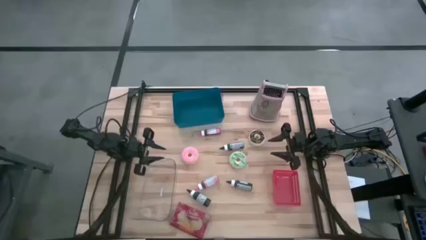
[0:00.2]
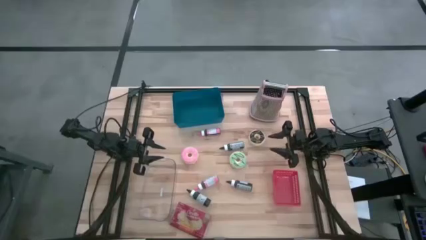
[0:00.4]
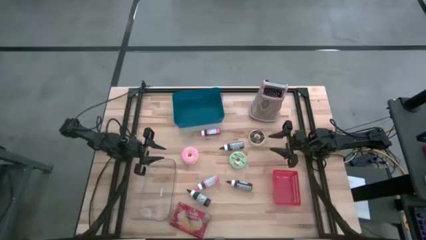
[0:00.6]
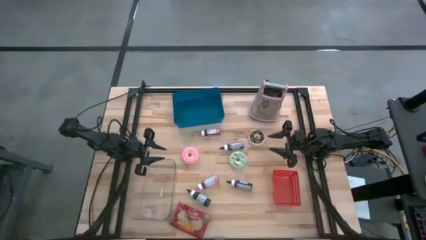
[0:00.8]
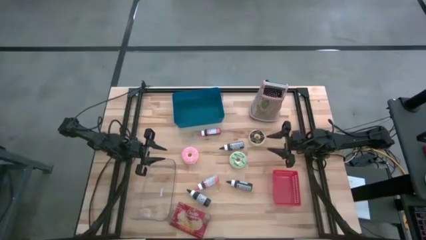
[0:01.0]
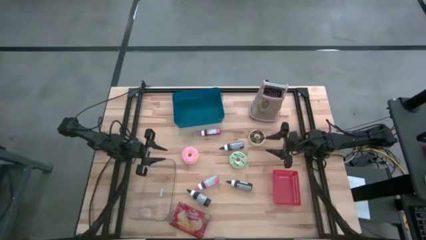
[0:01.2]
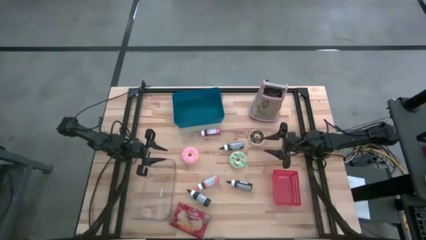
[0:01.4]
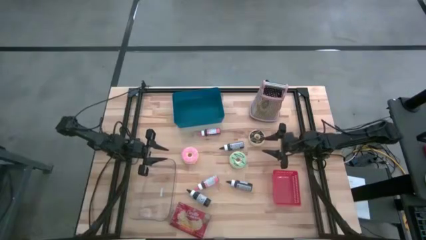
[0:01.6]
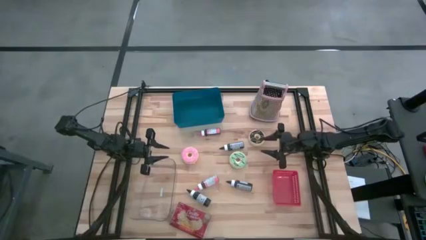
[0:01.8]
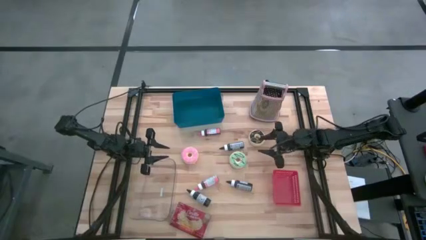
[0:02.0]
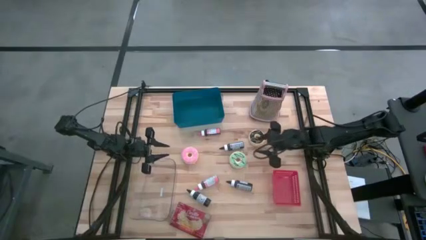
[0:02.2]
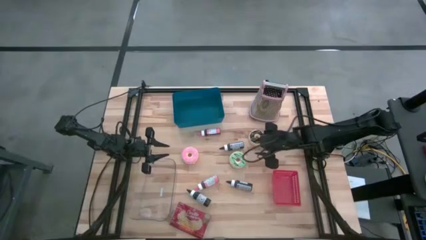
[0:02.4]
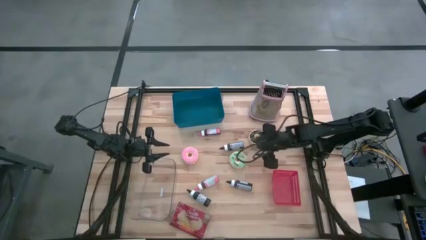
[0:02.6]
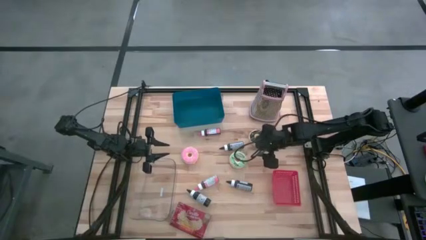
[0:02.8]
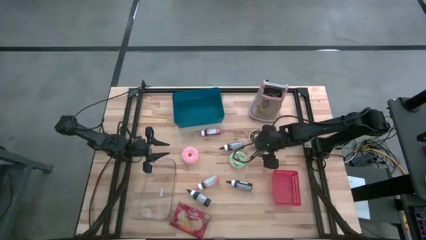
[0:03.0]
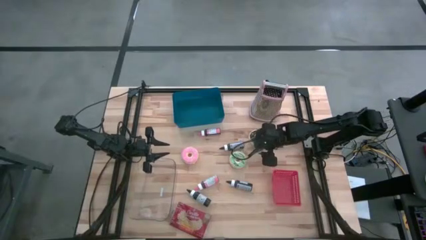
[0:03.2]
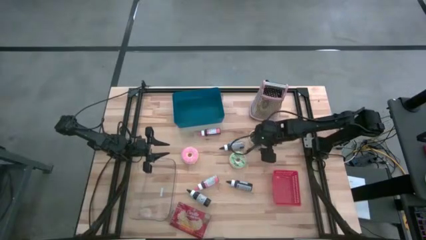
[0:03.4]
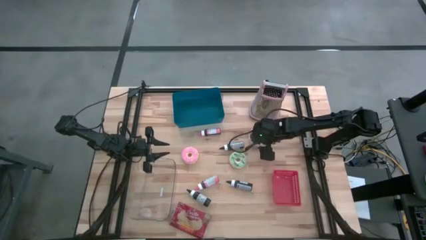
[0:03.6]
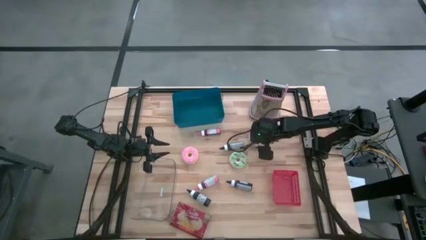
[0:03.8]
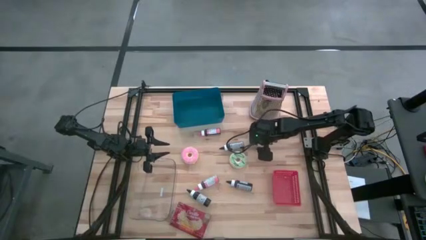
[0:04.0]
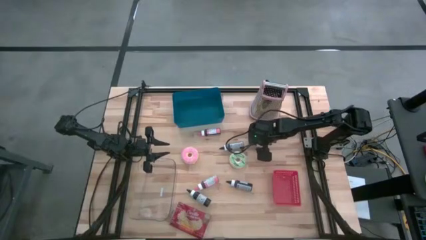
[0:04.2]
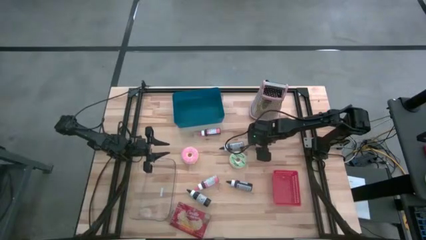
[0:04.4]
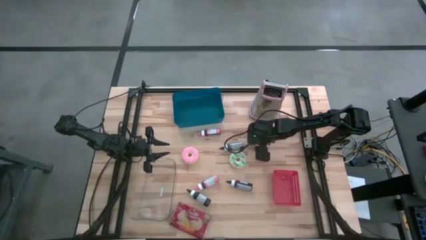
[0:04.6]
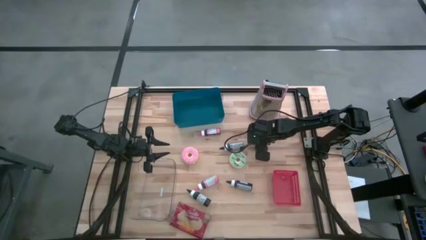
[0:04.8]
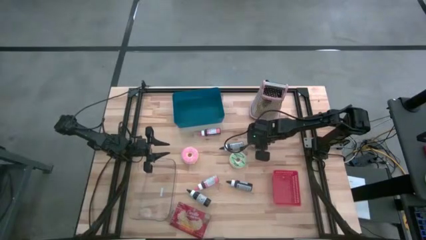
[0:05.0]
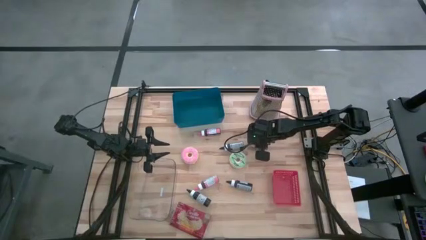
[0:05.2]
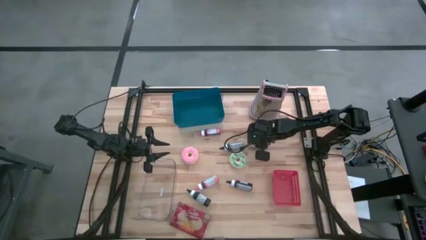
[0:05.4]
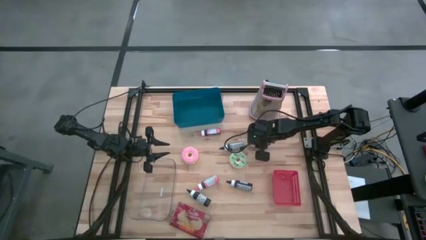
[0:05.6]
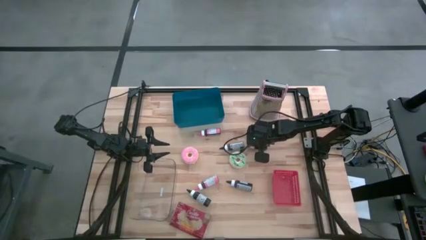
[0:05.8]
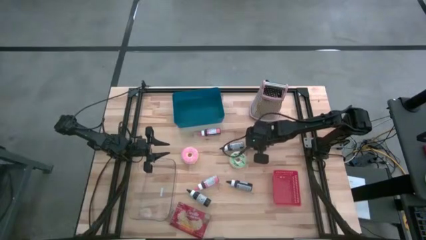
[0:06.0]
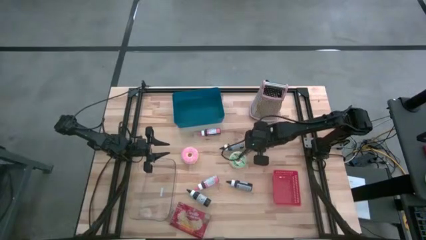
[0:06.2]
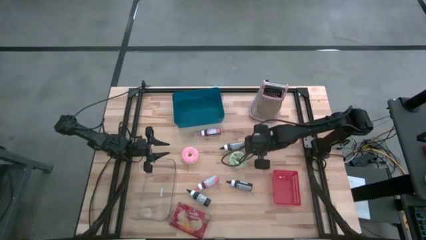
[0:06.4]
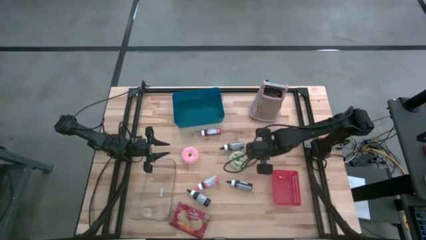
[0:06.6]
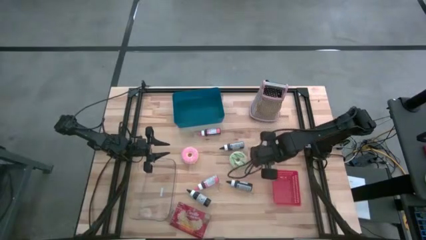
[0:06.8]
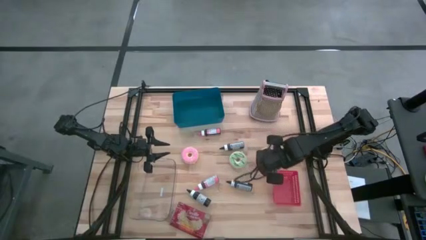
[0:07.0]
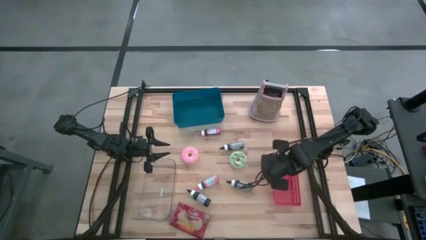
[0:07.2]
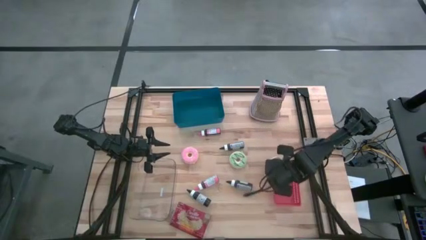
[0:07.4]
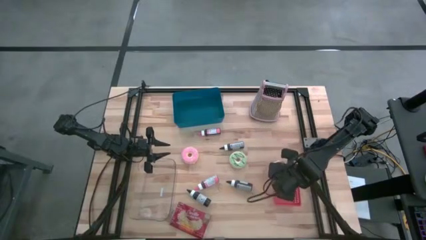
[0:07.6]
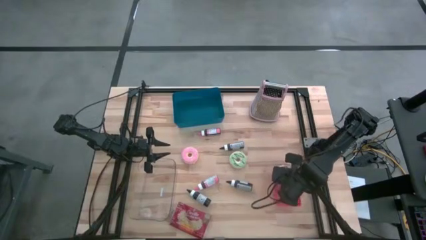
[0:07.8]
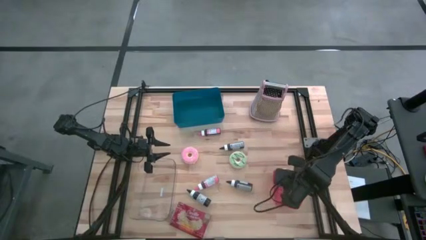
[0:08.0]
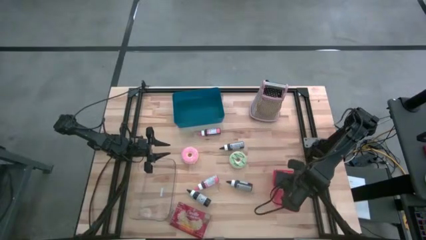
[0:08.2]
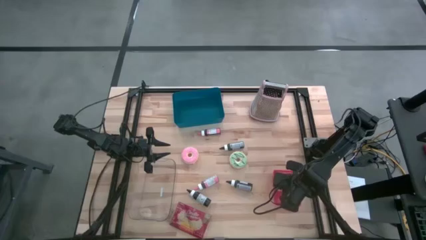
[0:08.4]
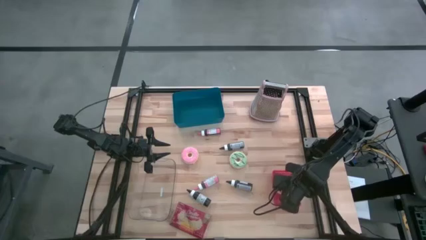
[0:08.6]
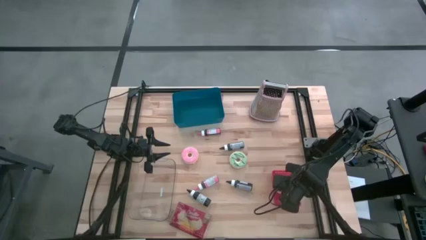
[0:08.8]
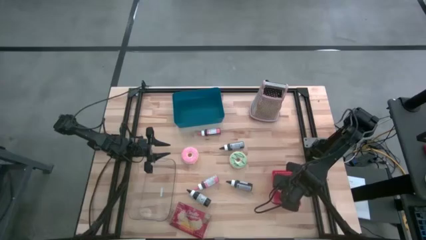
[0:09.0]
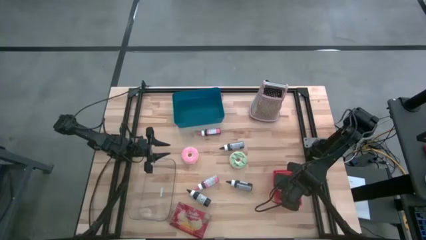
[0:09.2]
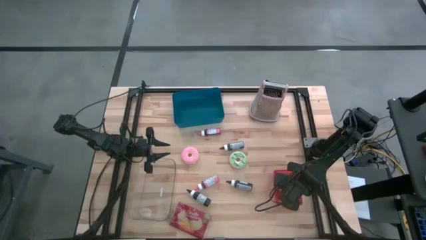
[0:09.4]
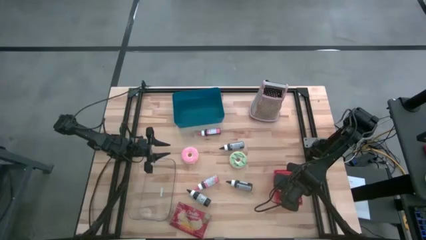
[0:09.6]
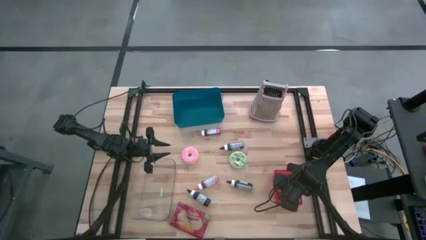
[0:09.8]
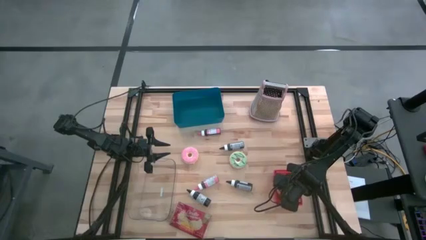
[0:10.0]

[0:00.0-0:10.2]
Task: Pick & Place Food Item
Put the black donut into the red basket
